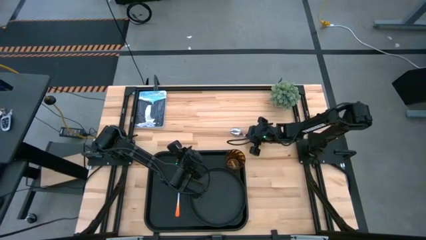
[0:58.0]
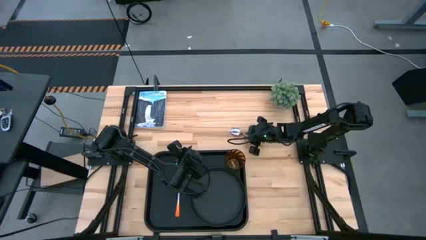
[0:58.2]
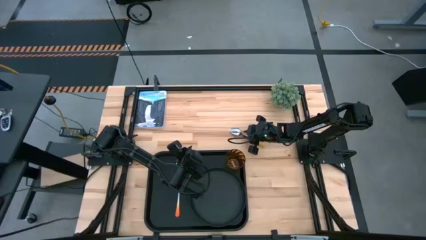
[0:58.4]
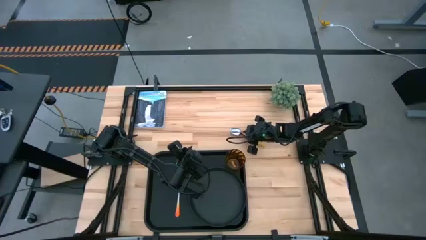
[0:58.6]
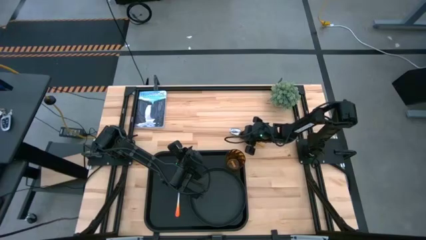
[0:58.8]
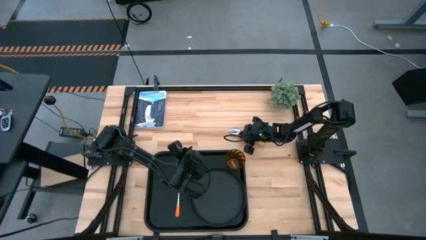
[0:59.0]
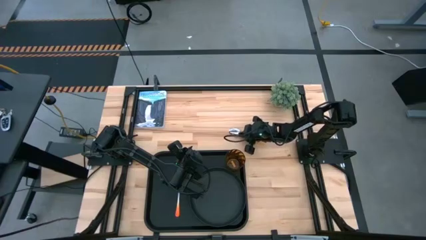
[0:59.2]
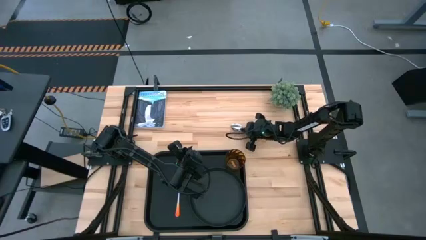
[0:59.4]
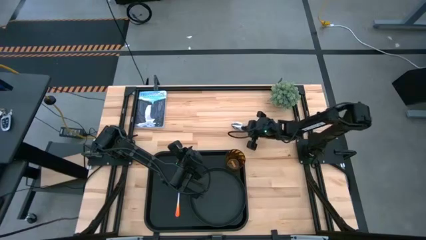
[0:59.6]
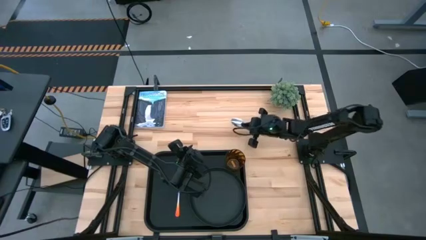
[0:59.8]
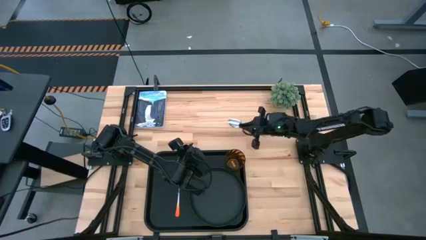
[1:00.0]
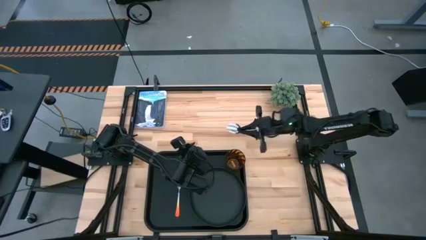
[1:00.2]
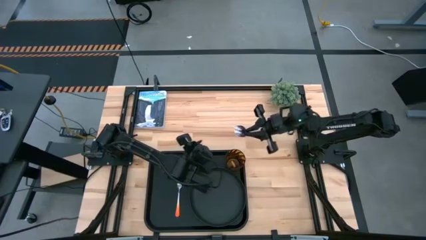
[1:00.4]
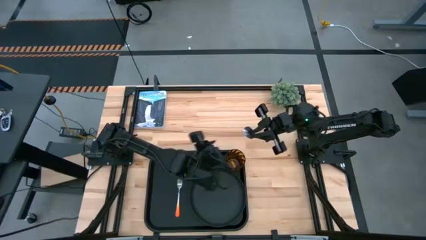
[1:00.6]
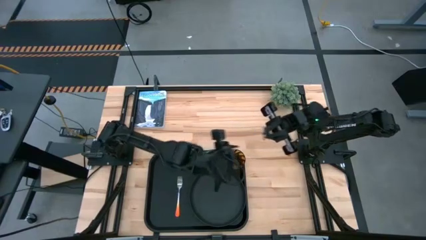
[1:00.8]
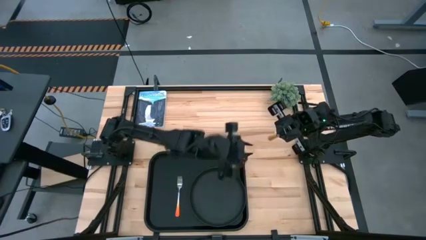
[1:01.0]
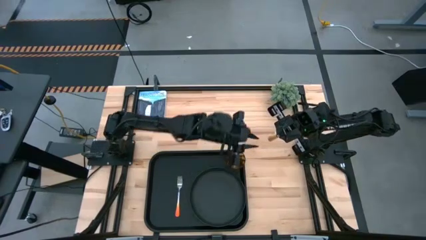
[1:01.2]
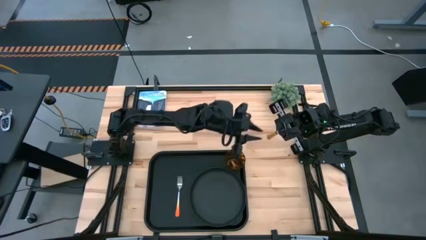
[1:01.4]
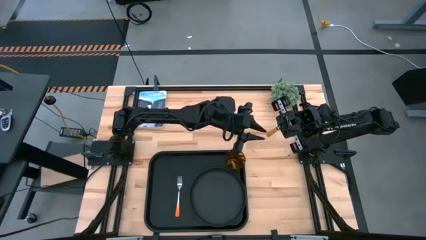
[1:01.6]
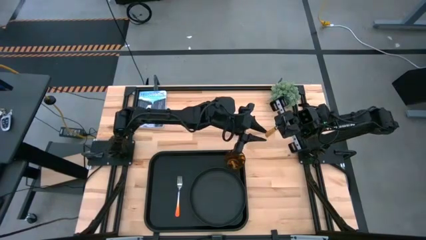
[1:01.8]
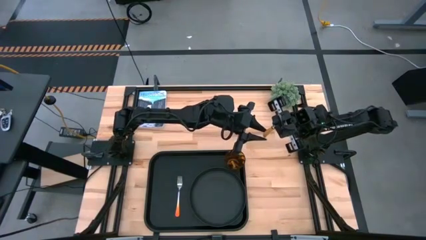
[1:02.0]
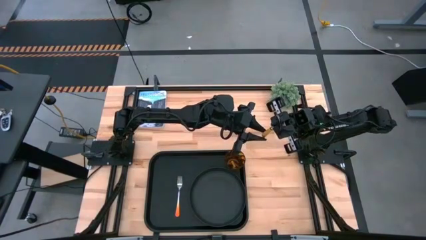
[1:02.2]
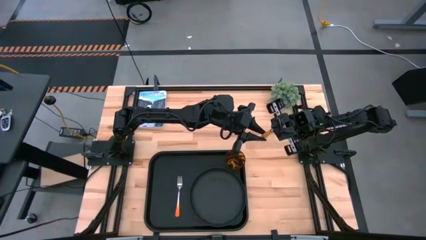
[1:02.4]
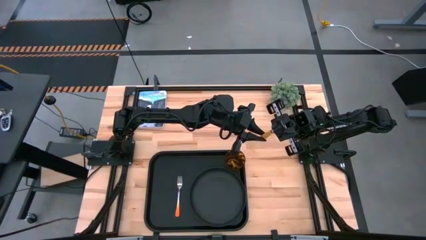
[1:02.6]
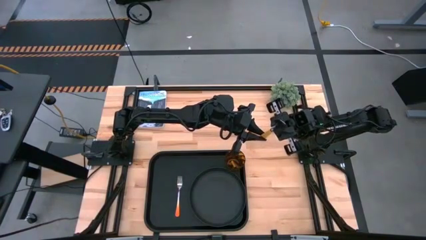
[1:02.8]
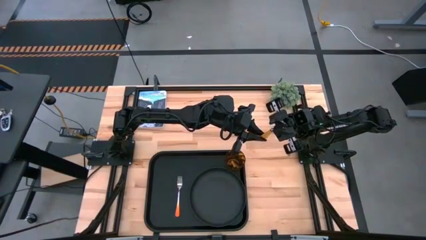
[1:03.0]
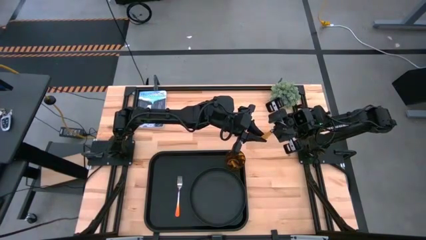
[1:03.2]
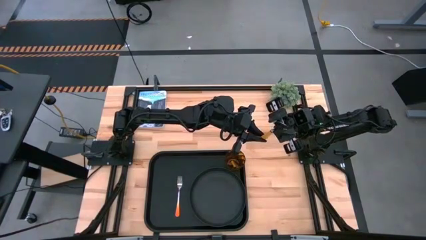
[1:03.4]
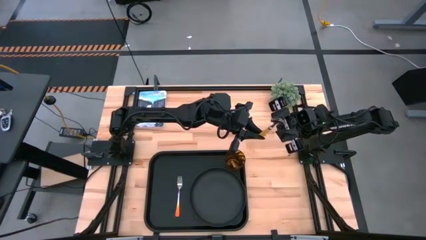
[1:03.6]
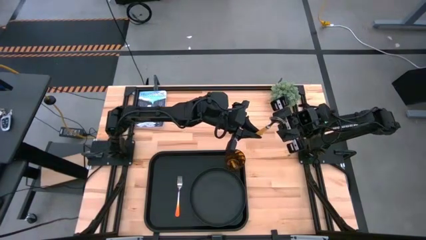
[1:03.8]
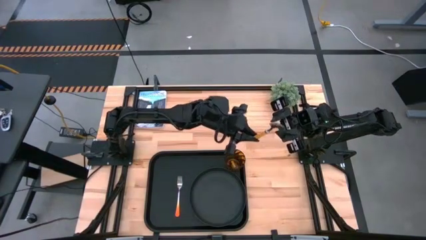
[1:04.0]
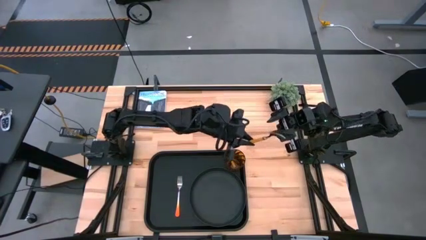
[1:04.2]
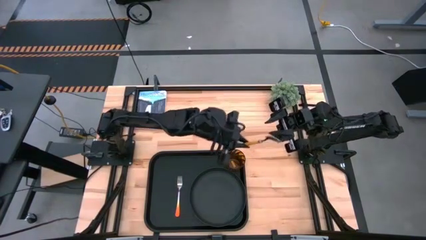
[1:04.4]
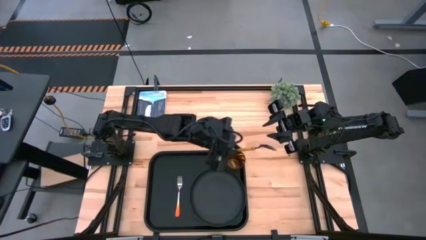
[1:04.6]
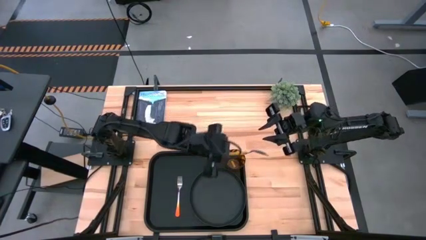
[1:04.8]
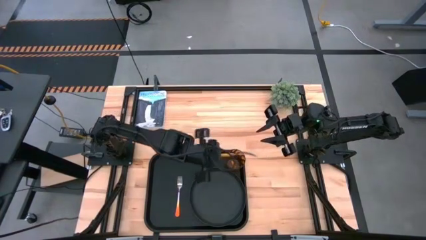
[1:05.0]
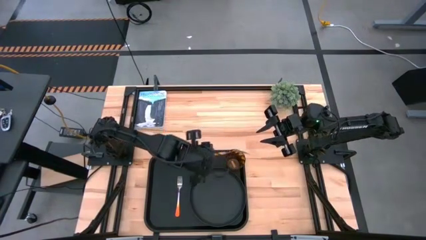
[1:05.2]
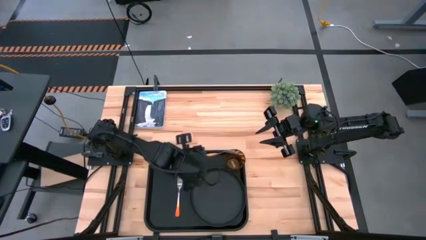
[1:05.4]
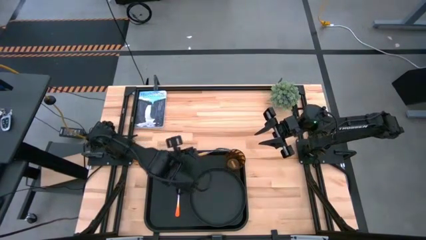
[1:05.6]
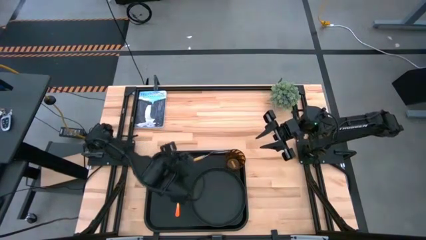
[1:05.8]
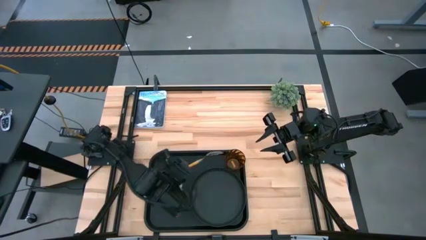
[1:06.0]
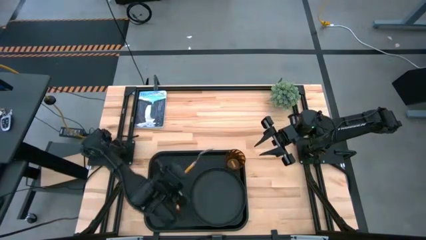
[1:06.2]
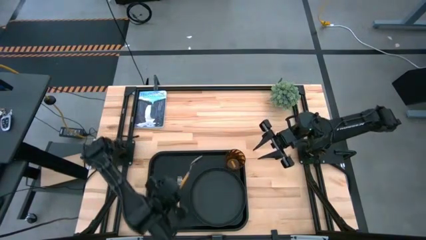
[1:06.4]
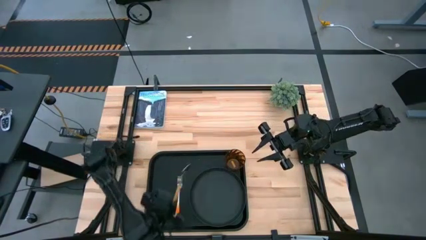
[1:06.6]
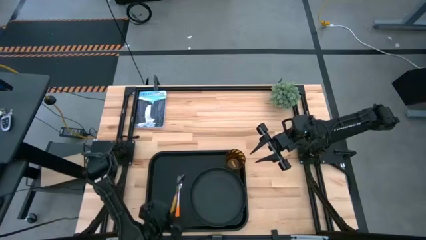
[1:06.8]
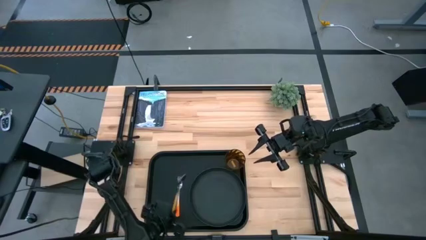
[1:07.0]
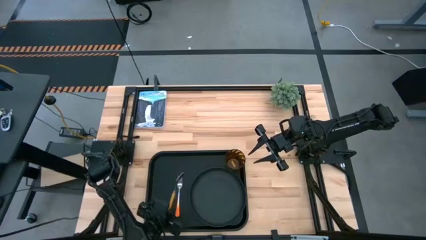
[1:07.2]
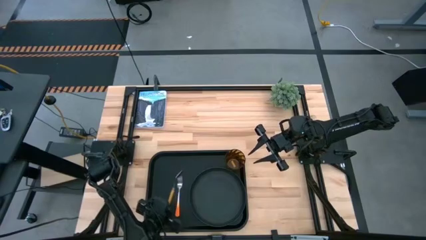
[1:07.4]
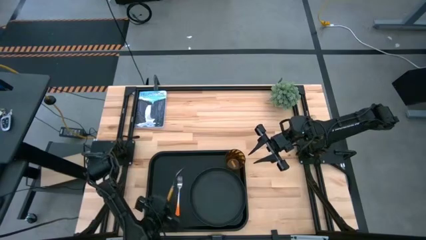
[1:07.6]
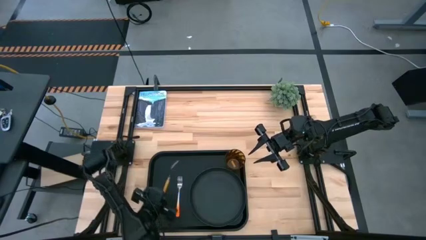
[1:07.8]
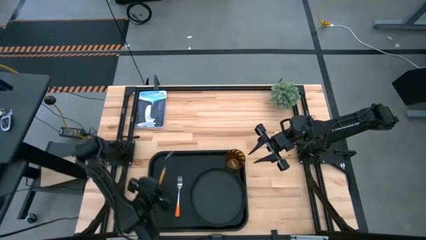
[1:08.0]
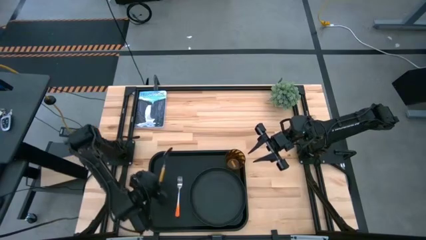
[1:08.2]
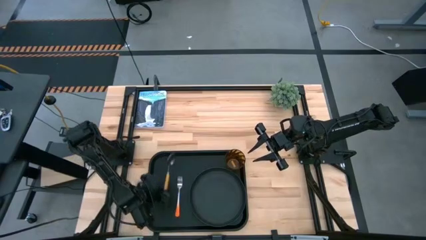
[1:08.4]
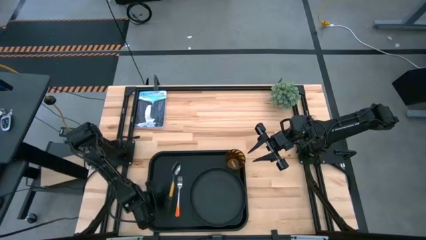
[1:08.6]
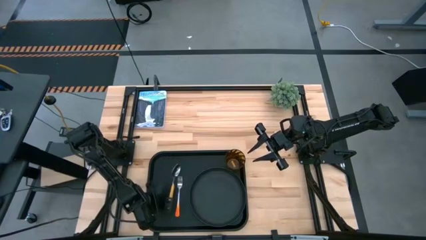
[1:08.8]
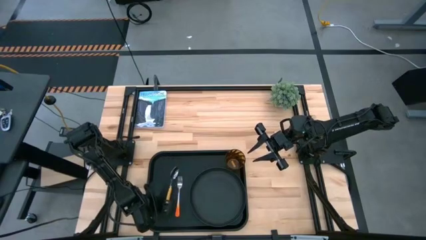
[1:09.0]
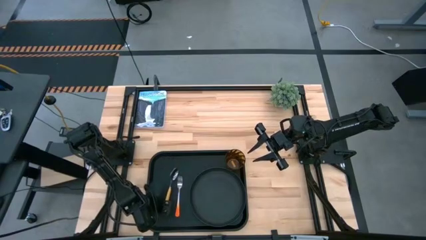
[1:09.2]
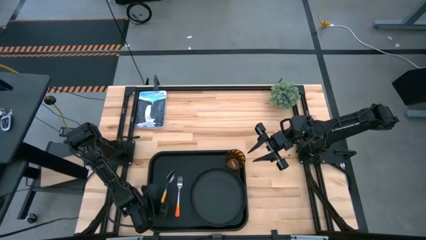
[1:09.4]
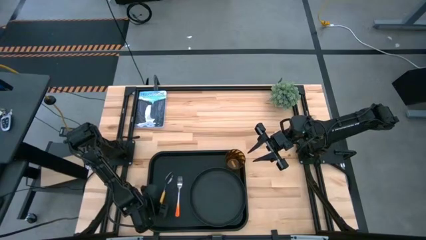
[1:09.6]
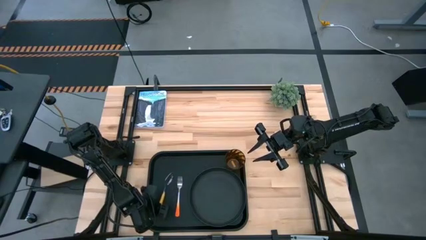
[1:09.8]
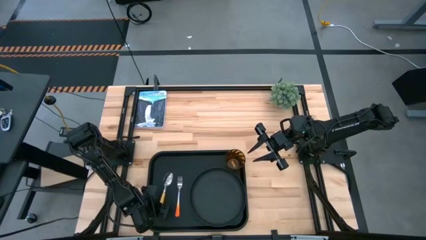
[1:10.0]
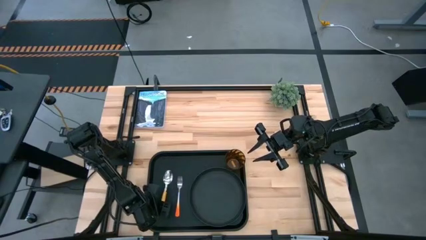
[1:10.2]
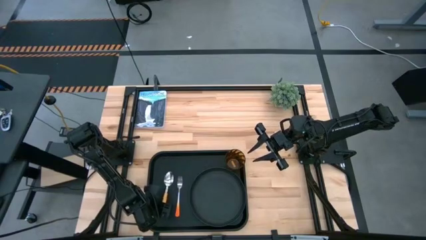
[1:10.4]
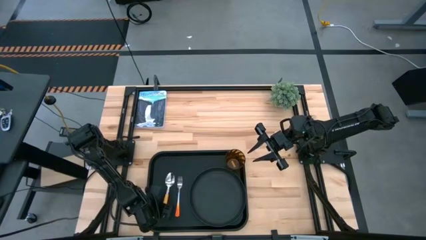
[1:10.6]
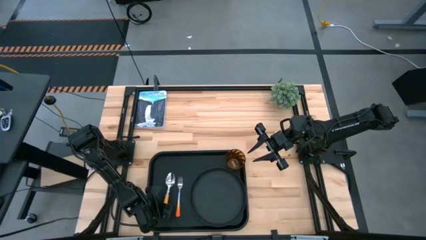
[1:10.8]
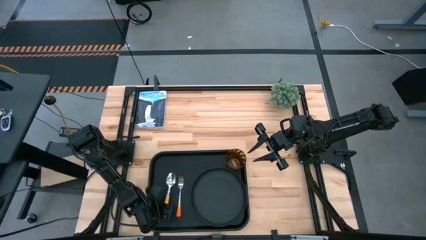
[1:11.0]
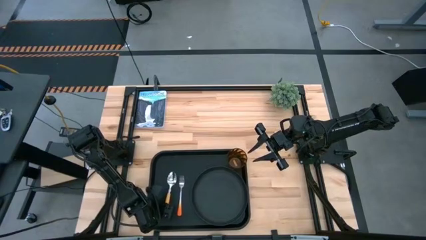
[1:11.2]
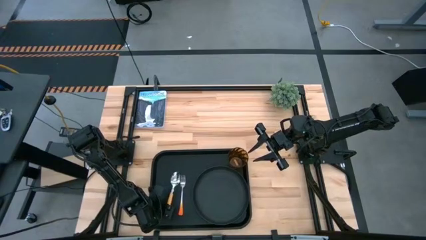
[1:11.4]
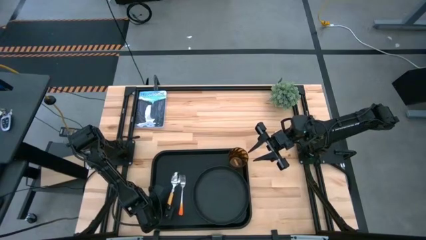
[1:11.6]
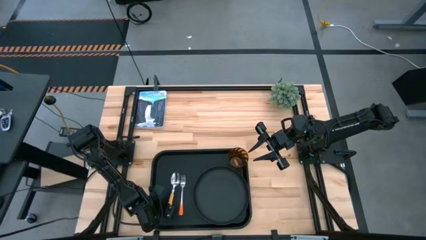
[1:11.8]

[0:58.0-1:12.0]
Task: Pick and place plate/cup/fork/spoon on tray
Put the brown spoon on the black tray to the left of the orange fork
